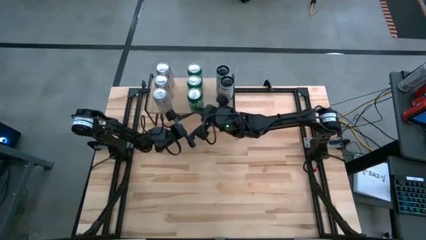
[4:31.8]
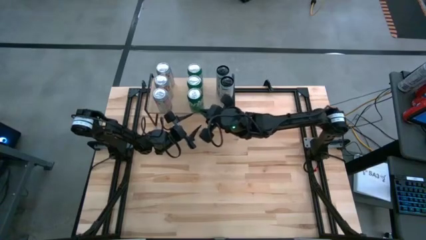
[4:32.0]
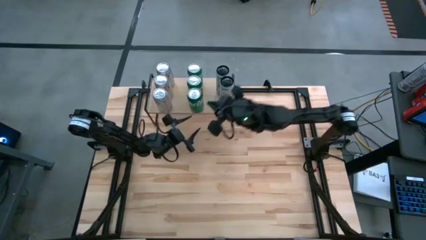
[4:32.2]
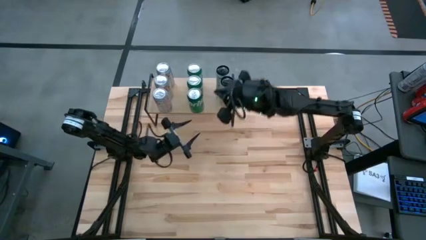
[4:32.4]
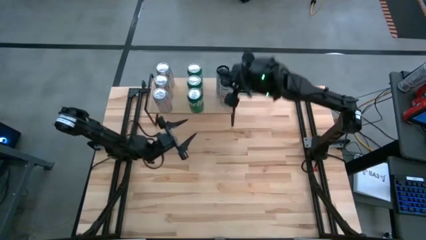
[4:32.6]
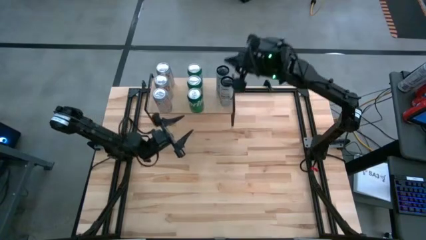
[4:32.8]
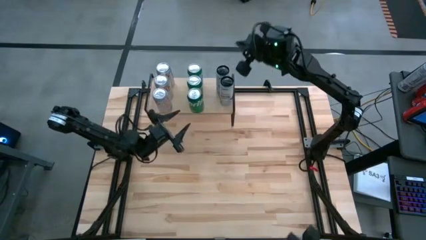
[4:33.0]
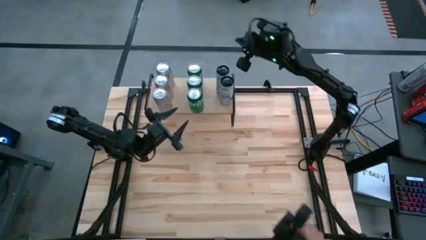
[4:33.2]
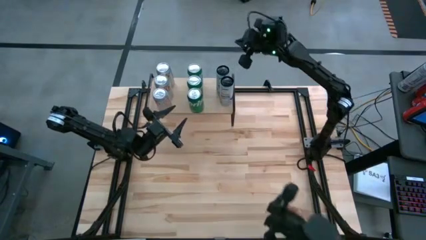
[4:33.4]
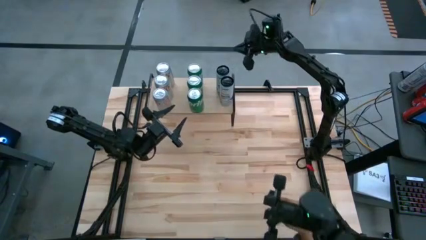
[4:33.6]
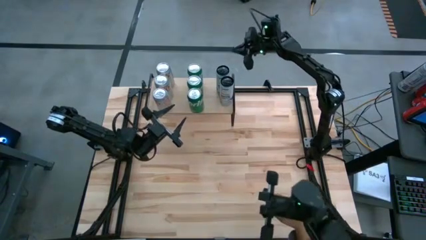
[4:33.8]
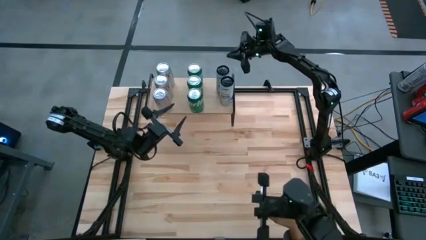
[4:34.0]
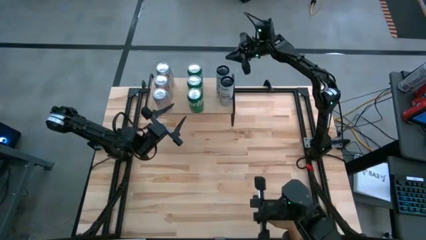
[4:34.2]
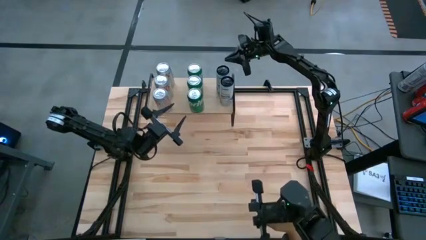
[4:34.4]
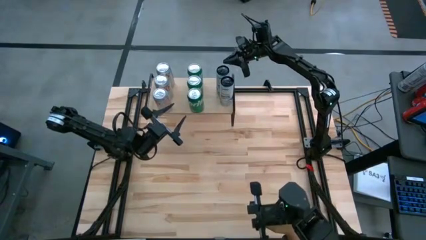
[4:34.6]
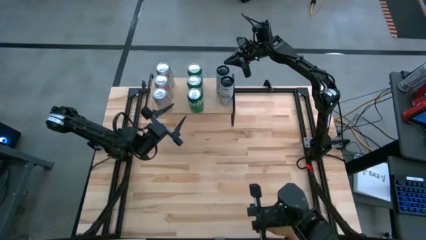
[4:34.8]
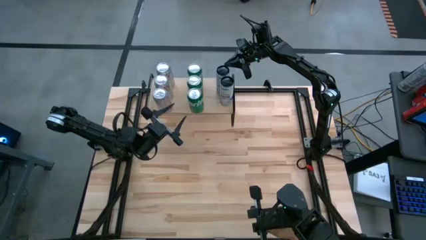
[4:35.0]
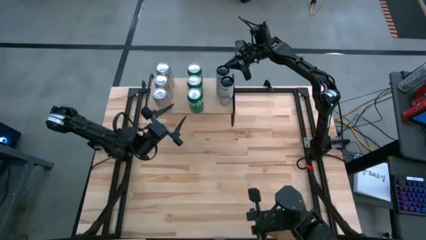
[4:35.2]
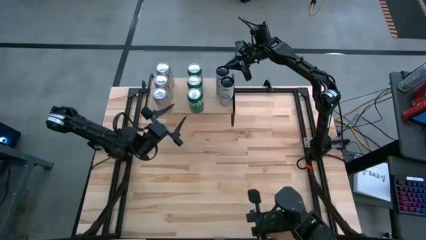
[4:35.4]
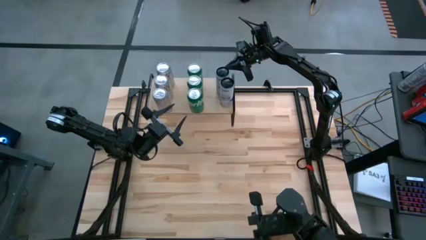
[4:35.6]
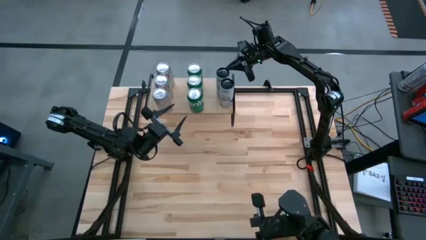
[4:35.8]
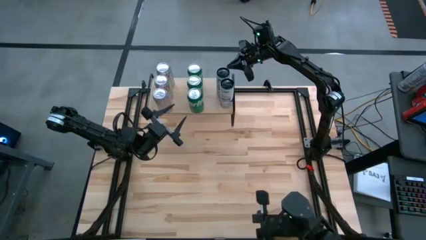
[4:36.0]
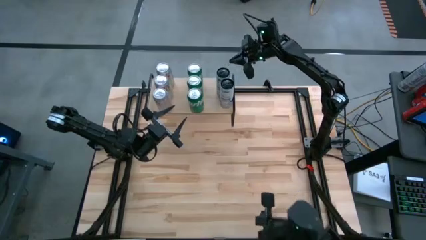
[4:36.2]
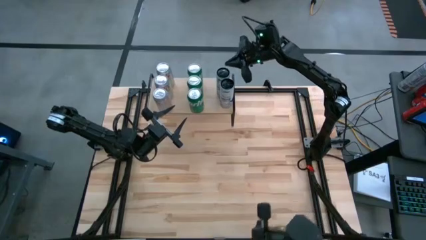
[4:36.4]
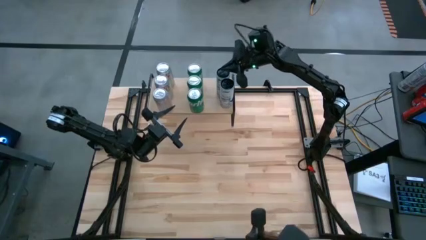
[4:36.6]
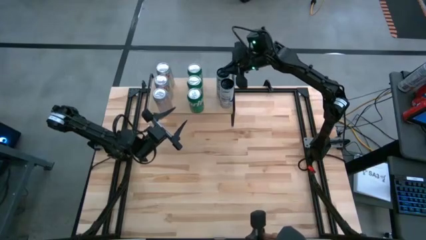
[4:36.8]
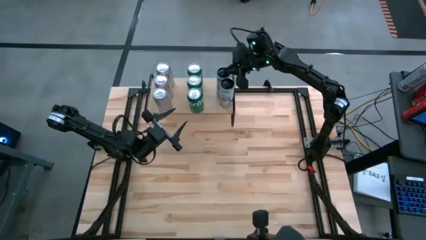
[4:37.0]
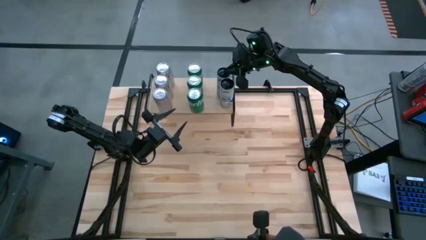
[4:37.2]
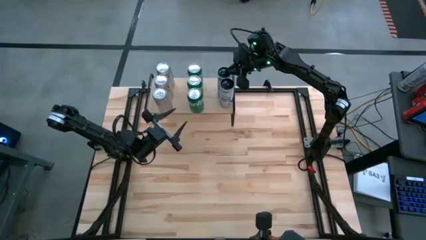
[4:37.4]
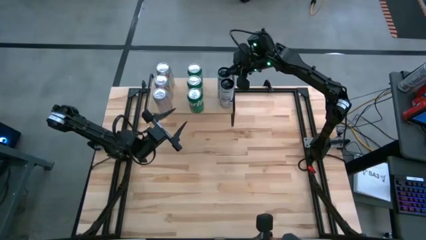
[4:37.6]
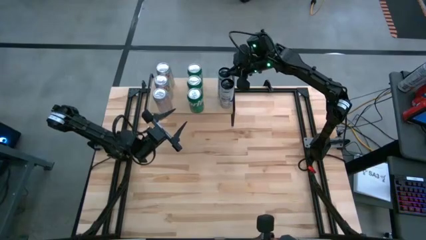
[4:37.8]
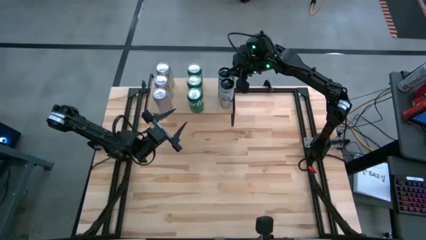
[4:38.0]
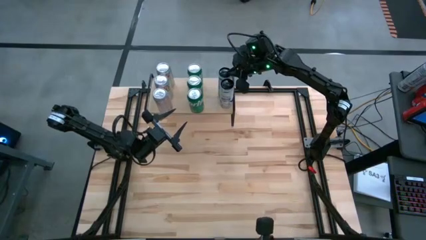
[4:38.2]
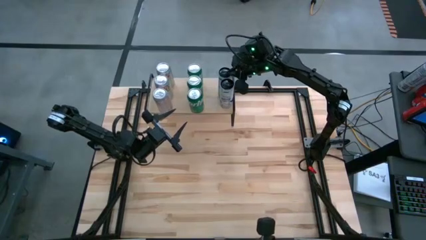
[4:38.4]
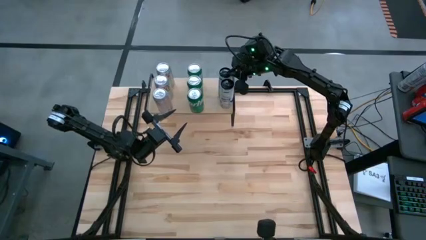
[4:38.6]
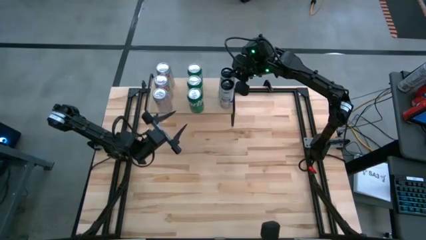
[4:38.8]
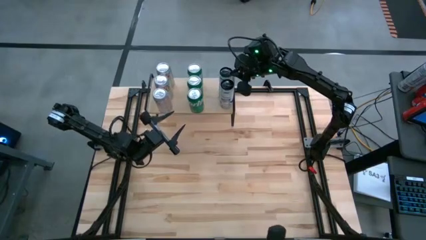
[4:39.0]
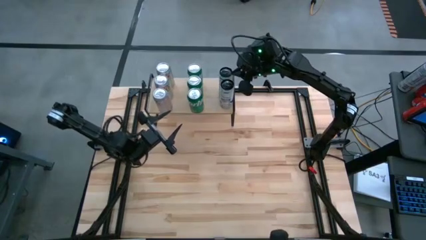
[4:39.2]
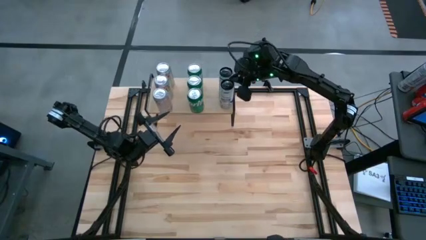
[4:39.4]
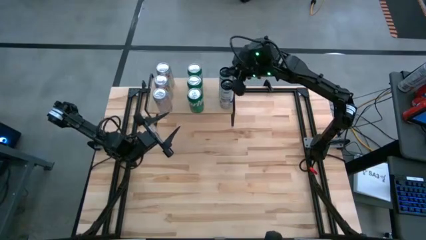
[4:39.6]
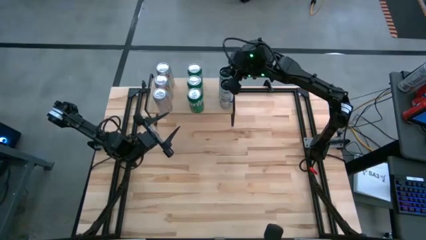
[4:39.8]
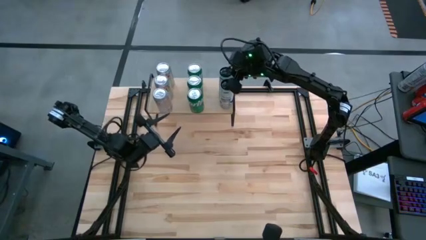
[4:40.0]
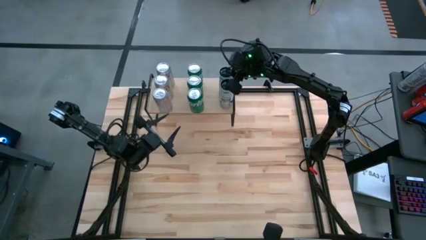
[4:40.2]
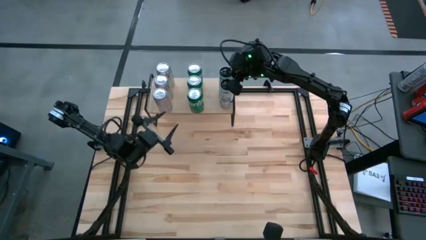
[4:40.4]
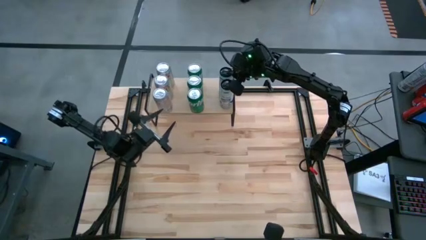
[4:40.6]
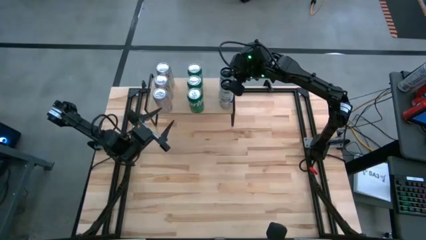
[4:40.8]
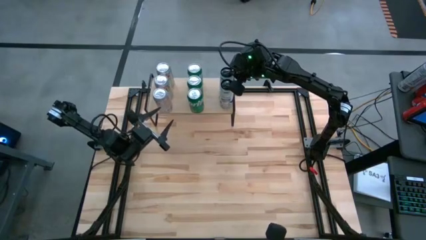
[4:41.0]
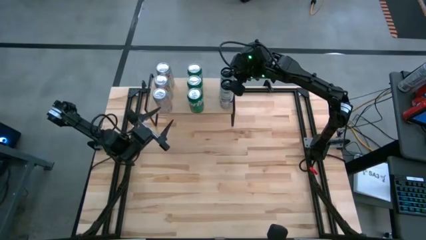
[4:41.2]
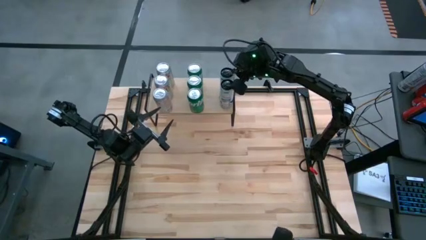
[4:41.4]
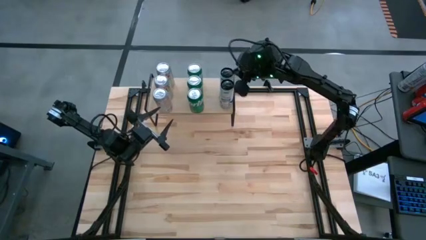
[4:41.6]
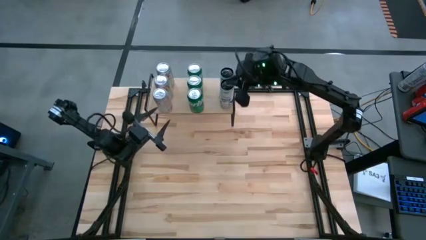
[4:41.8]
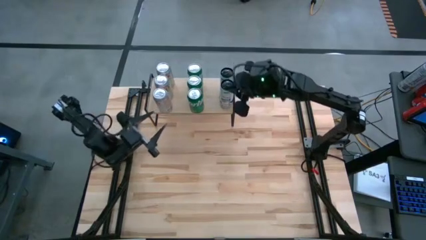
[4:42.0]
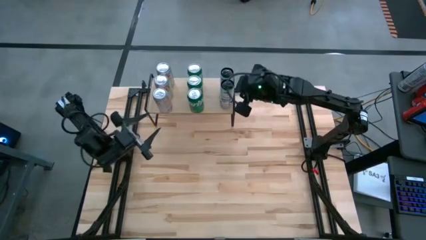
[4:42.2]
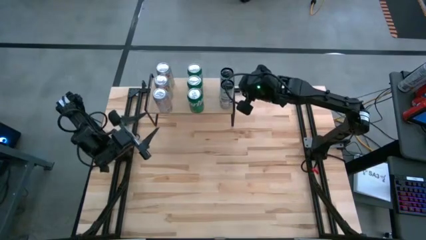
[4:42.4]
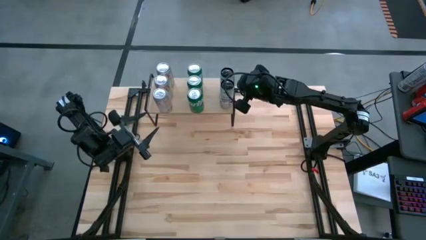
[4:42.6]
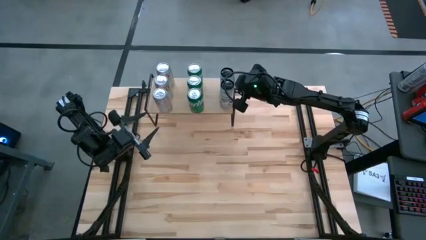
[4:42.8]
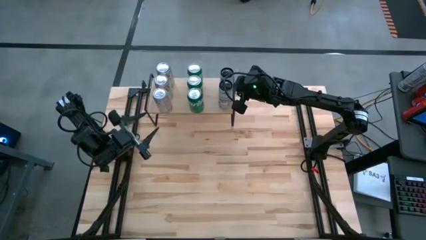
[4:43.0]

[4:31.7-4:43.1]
Task: Place canned beverage on shelf
Adjust the soda cans on the shelf

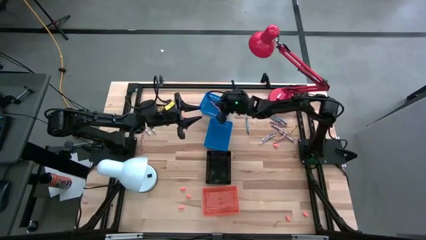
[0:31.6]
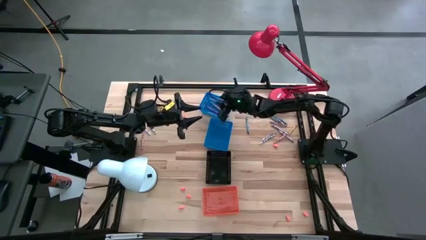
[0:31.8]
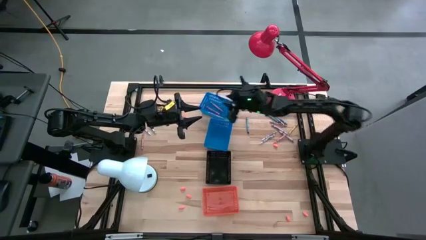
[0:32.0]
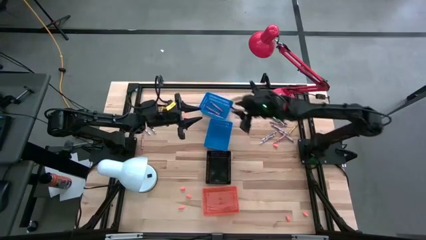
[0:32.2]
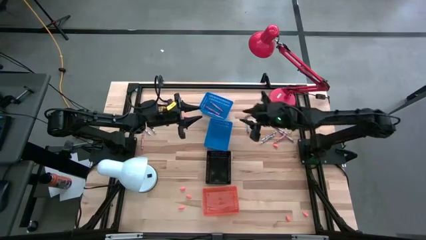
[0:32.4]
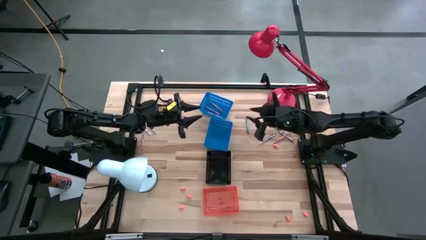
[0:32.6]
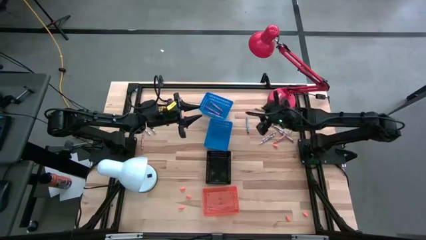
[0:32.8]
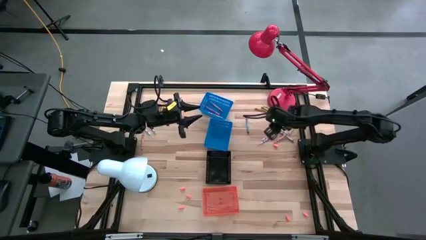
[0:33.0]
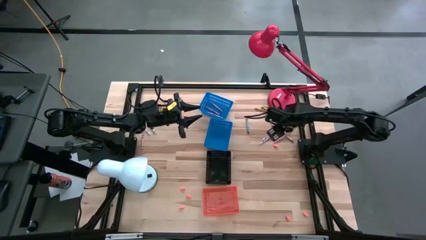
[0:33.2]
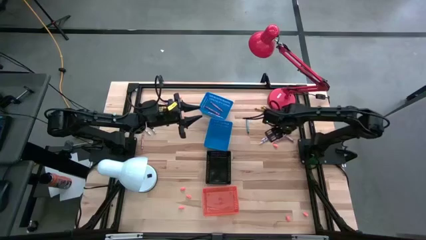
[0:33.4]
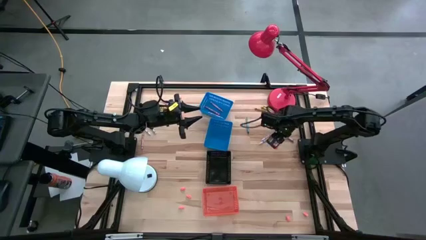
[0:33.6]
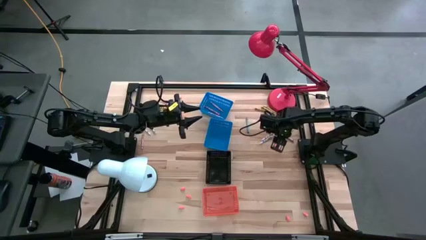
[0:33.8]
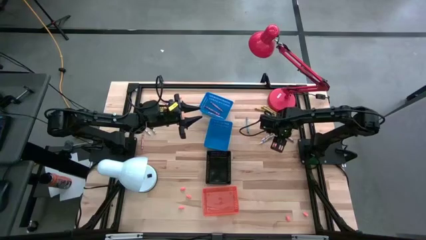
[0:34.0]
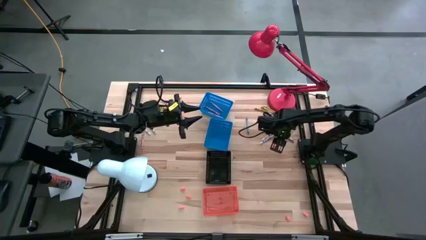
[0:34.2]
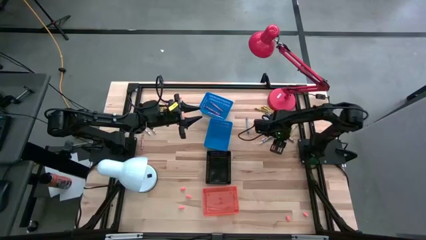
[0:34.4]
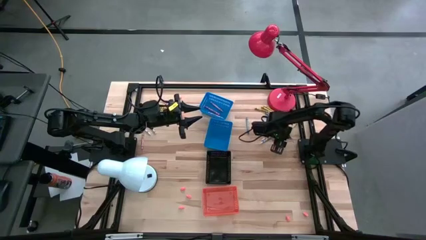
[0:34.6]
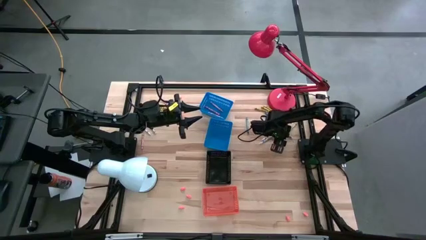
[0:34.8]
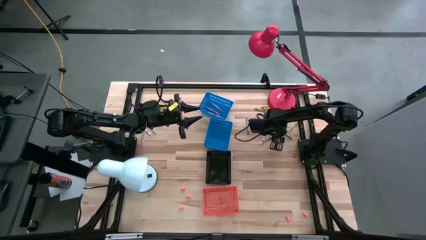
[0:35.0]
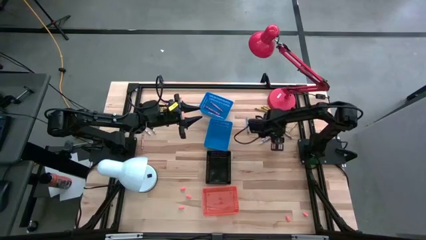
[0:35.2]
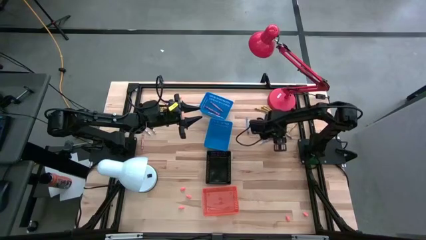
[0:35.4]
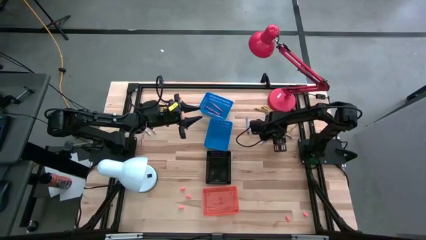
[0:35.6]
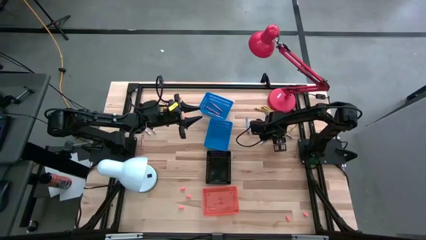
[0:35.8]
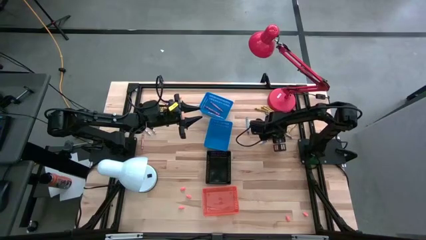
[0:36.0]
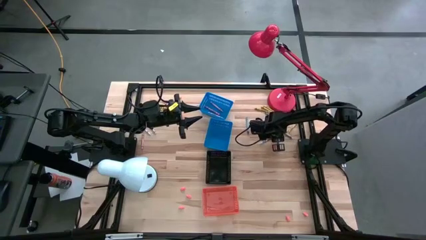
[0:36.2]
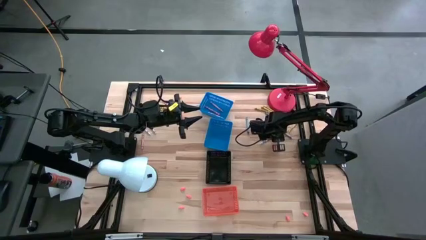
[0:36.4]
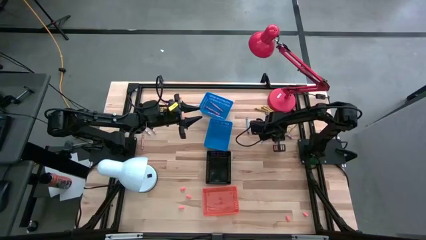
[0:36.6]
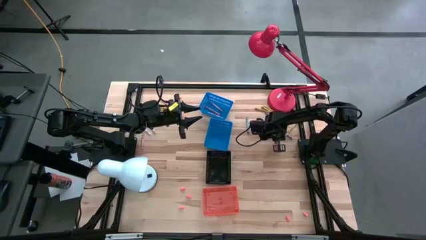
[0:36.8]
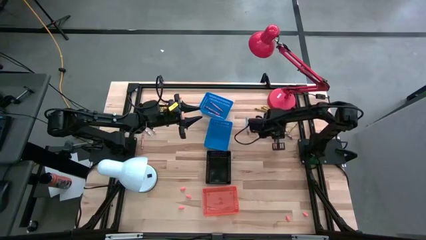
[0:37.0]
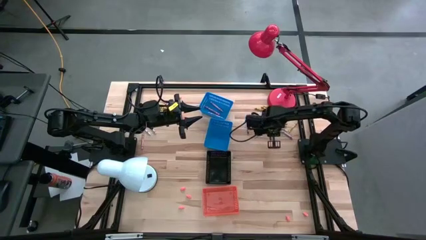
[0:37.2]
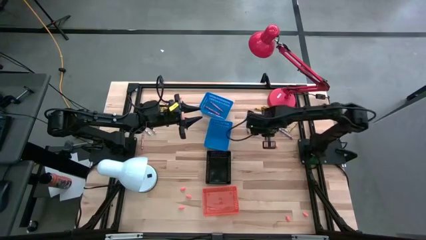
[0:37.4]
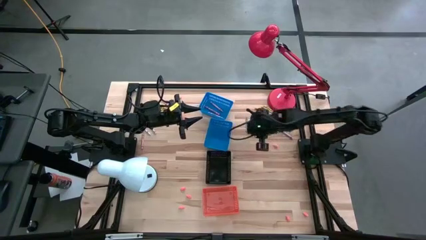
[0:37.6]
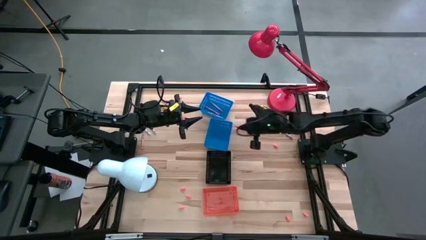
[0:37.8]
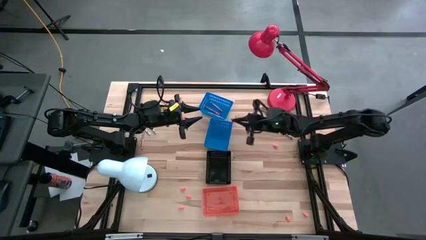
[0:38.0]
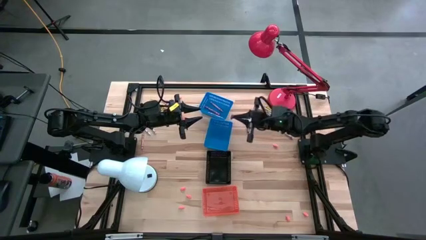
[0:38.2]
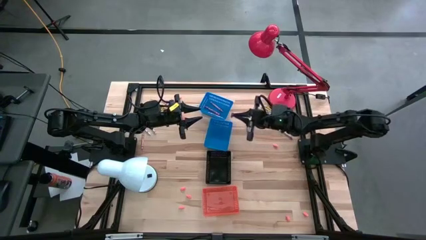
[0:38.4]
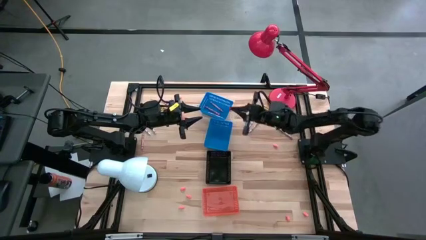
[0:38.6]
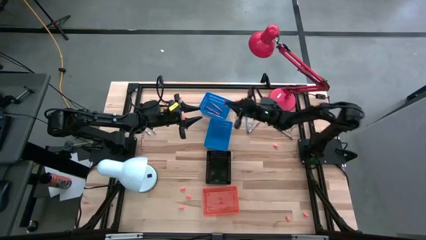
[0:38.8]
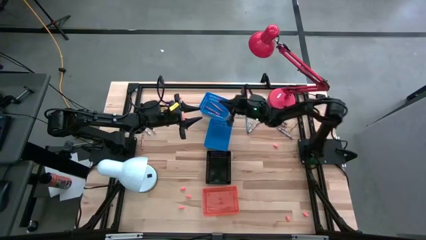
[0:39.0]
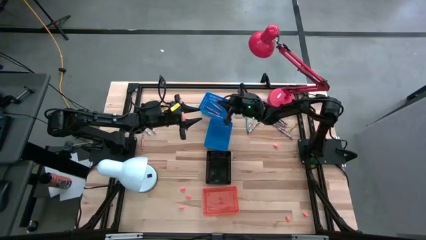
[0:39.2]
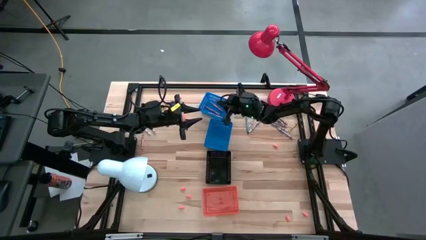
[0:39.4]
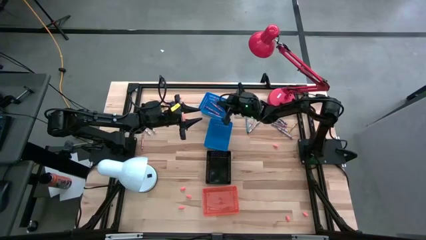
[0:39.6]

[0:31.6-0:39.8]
Task: Sort crayons
Put the pink crayon into the top blue bin
